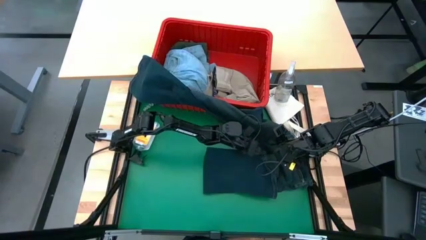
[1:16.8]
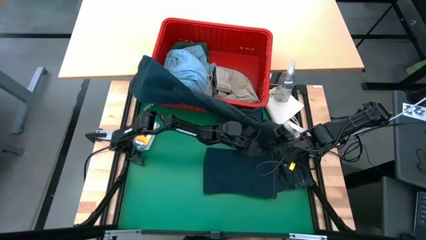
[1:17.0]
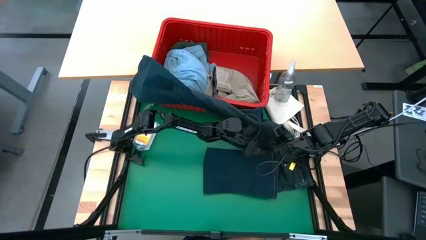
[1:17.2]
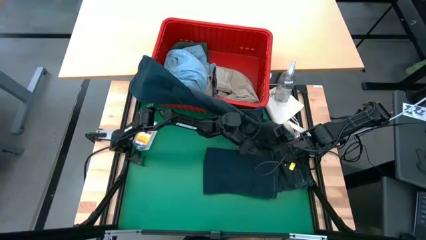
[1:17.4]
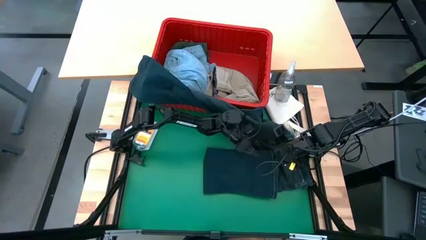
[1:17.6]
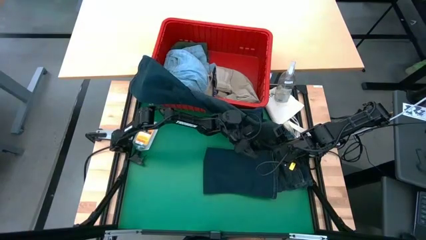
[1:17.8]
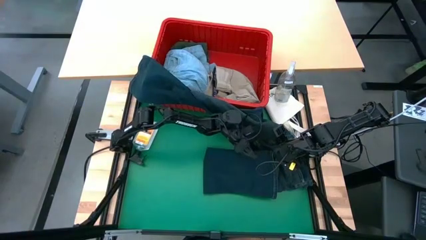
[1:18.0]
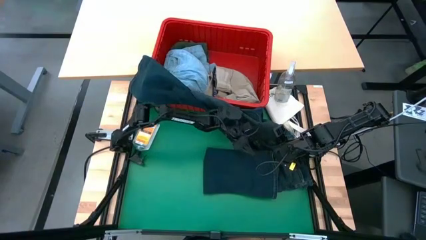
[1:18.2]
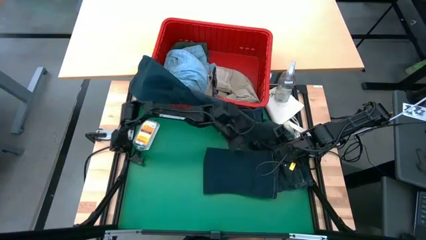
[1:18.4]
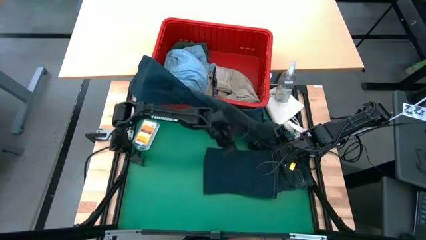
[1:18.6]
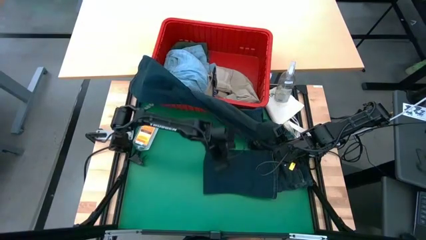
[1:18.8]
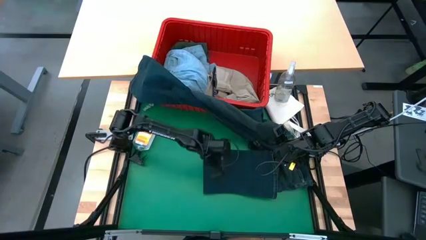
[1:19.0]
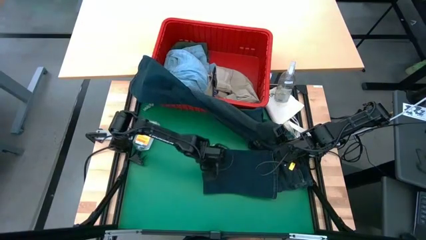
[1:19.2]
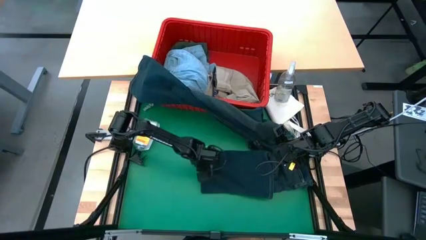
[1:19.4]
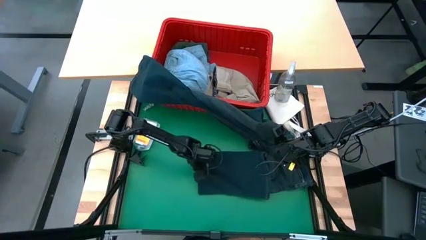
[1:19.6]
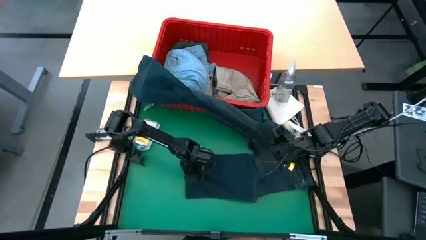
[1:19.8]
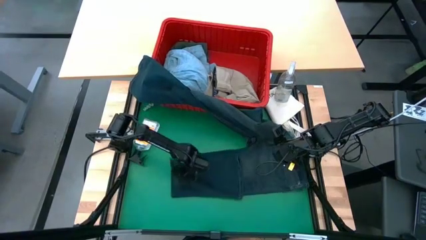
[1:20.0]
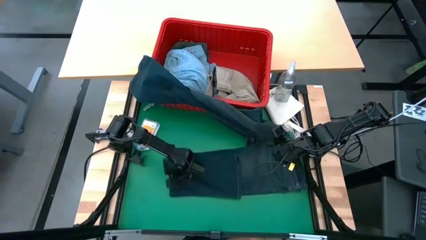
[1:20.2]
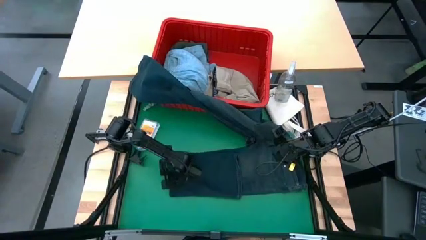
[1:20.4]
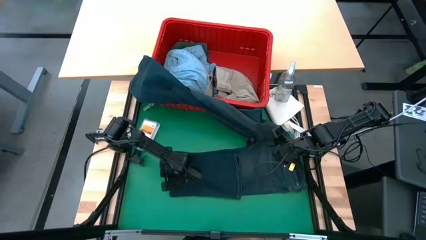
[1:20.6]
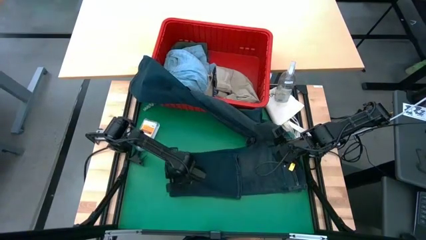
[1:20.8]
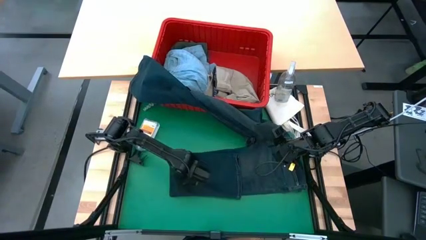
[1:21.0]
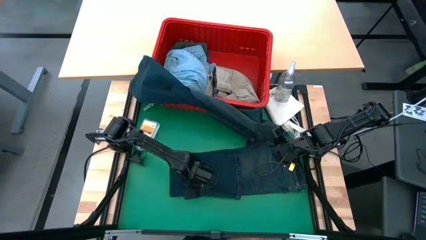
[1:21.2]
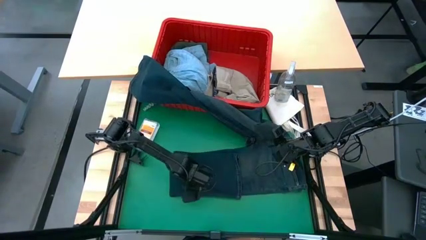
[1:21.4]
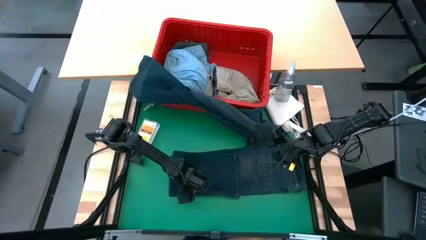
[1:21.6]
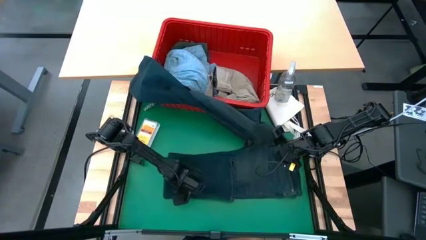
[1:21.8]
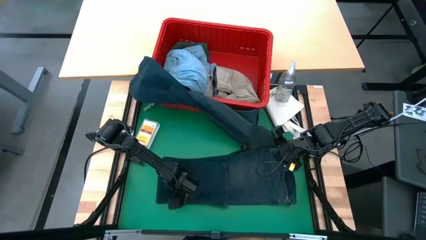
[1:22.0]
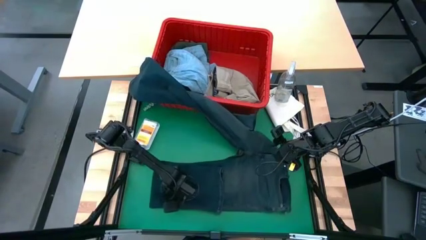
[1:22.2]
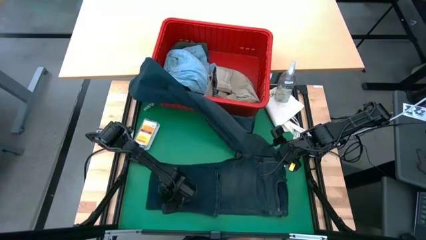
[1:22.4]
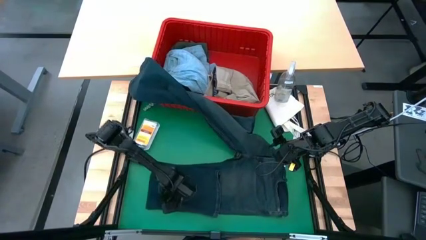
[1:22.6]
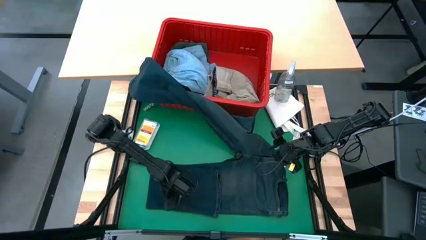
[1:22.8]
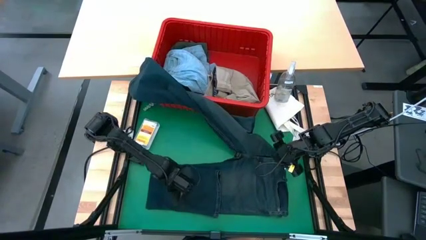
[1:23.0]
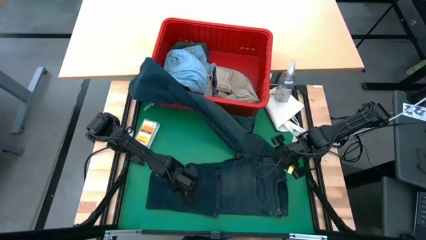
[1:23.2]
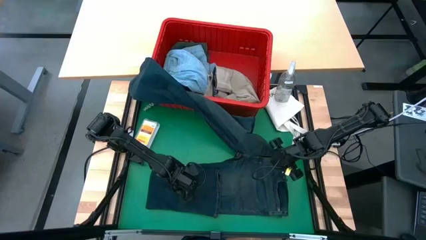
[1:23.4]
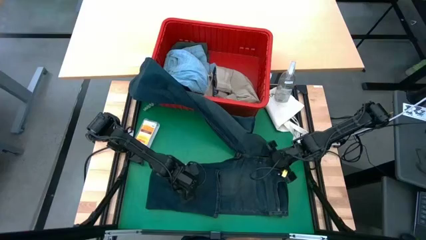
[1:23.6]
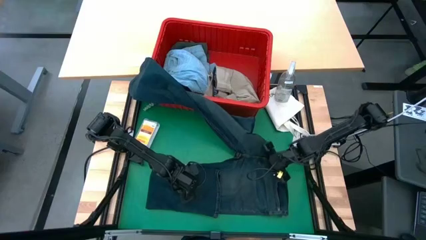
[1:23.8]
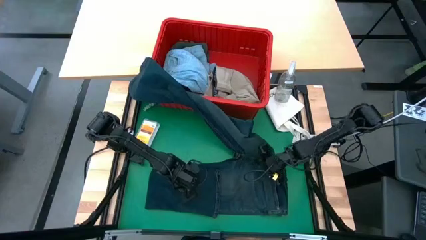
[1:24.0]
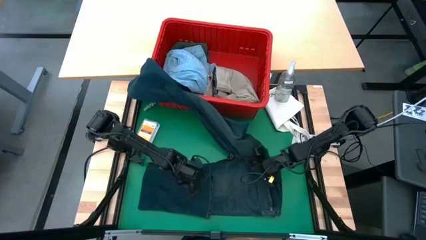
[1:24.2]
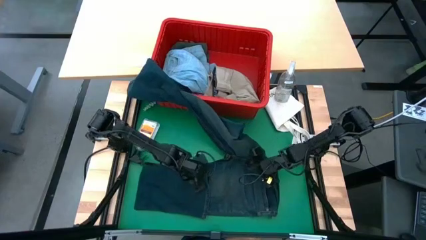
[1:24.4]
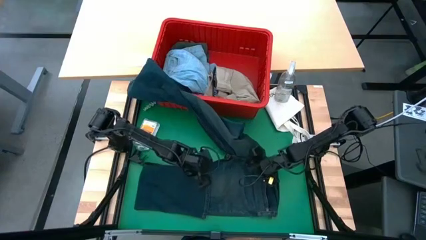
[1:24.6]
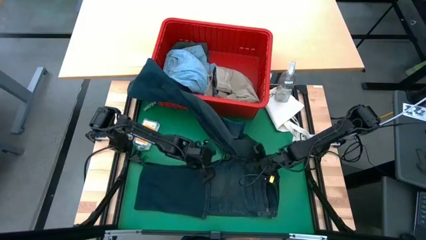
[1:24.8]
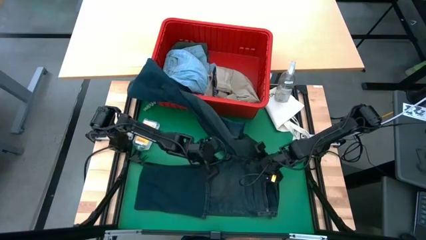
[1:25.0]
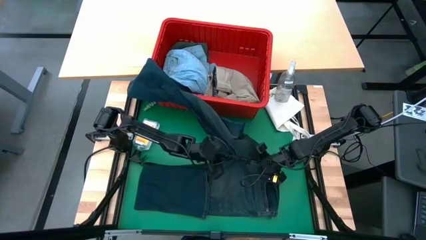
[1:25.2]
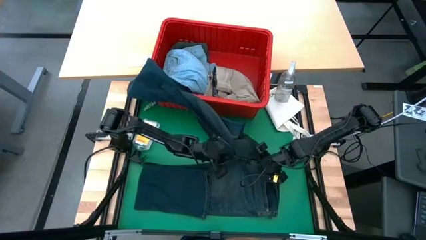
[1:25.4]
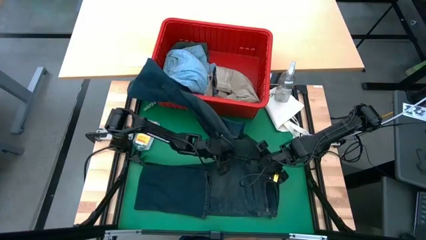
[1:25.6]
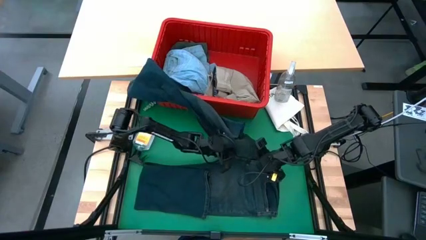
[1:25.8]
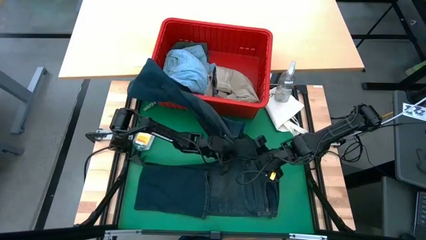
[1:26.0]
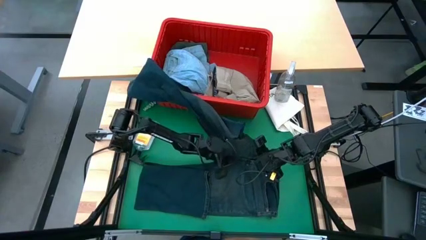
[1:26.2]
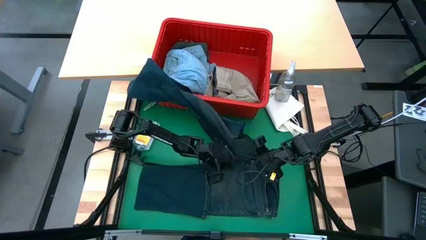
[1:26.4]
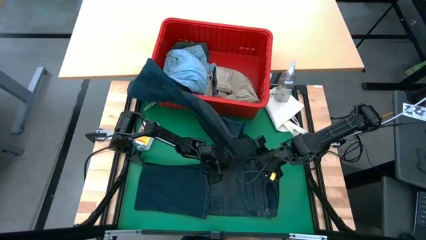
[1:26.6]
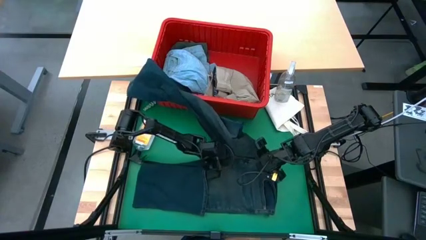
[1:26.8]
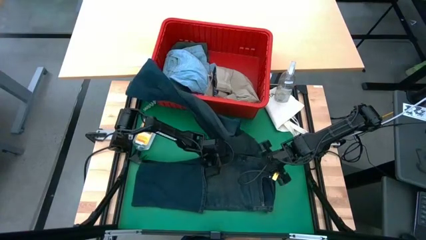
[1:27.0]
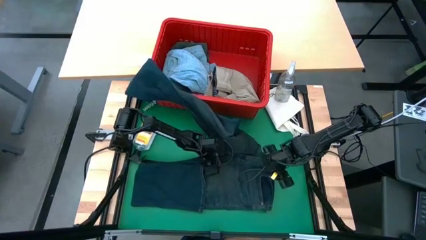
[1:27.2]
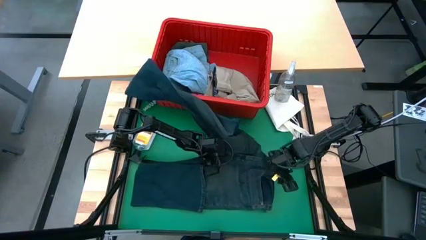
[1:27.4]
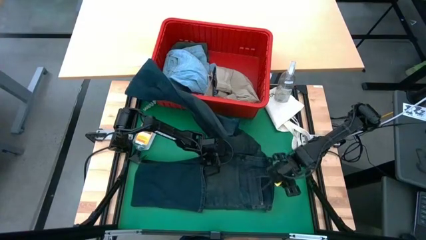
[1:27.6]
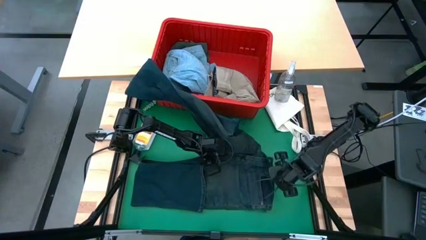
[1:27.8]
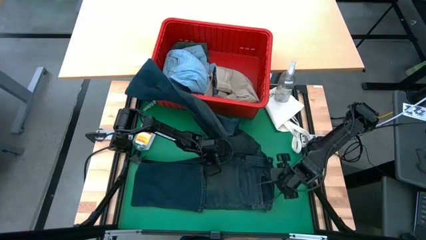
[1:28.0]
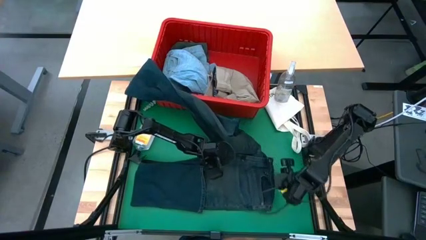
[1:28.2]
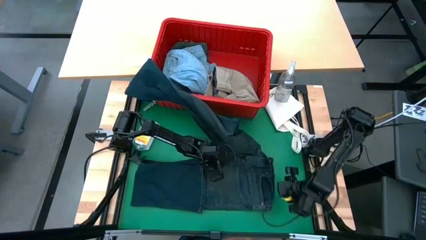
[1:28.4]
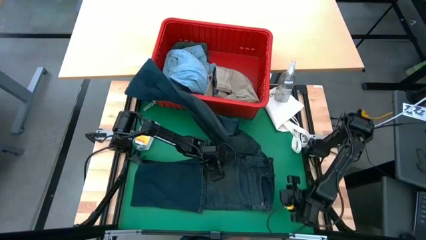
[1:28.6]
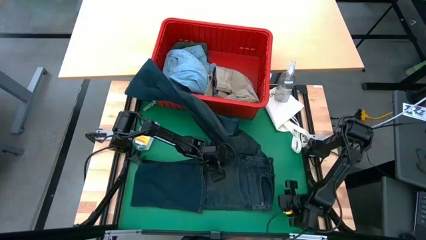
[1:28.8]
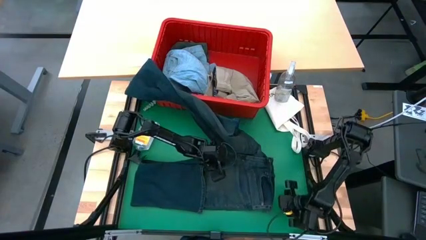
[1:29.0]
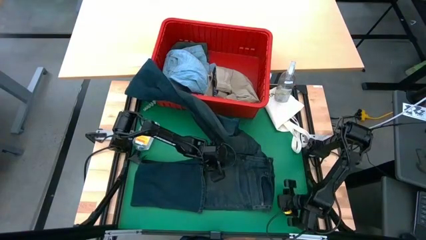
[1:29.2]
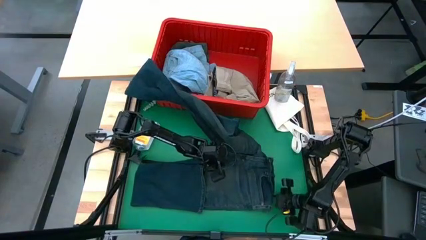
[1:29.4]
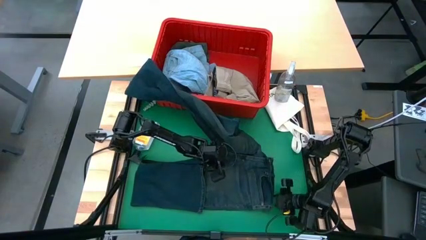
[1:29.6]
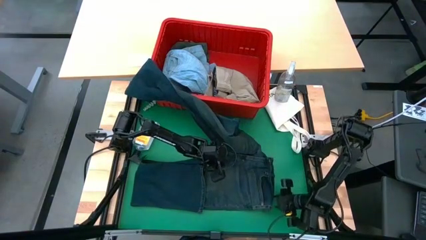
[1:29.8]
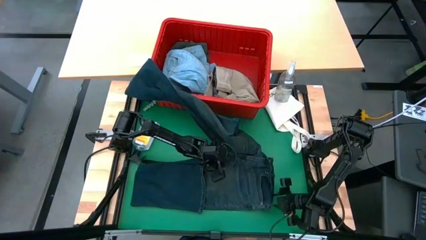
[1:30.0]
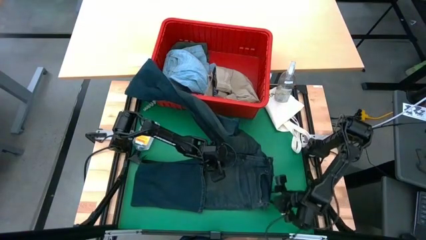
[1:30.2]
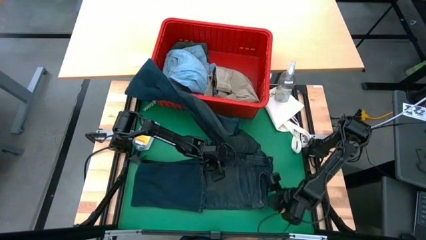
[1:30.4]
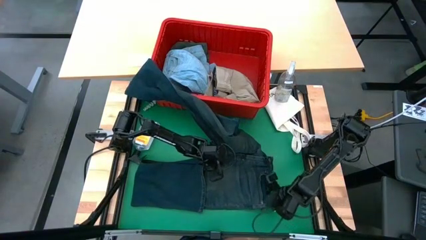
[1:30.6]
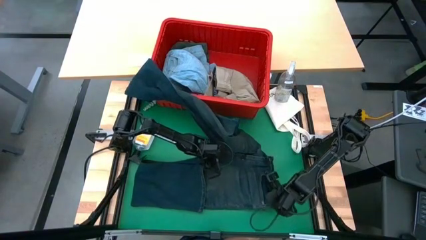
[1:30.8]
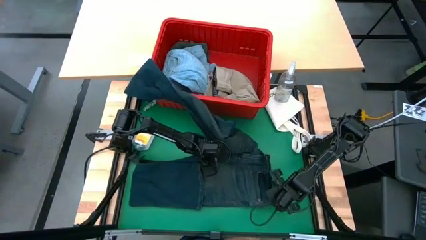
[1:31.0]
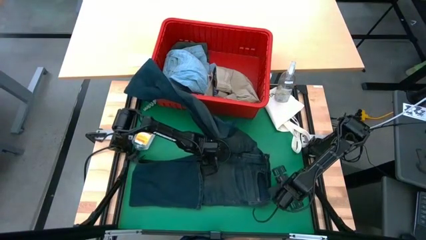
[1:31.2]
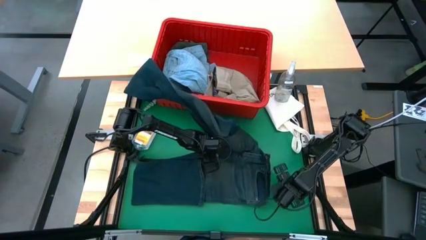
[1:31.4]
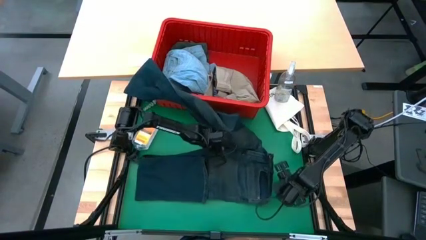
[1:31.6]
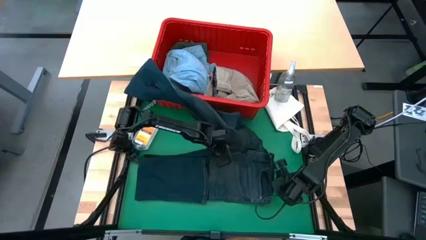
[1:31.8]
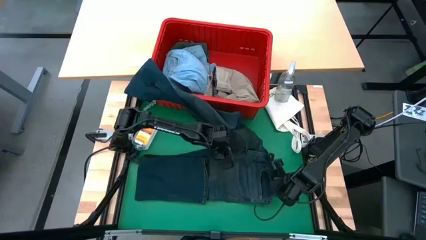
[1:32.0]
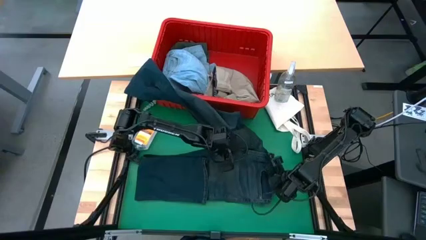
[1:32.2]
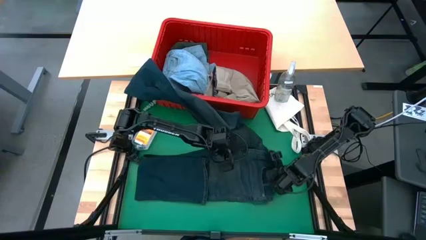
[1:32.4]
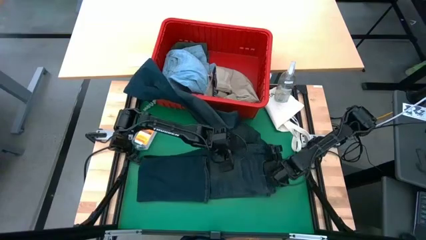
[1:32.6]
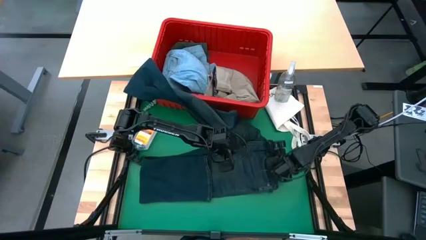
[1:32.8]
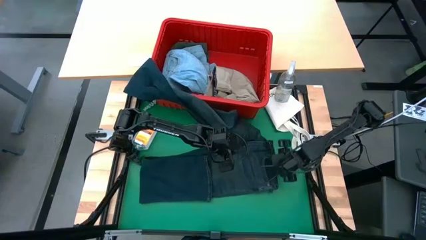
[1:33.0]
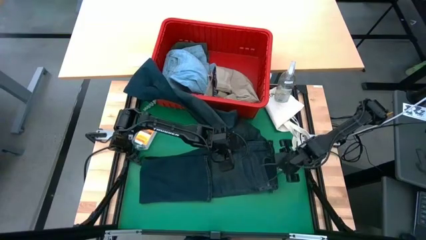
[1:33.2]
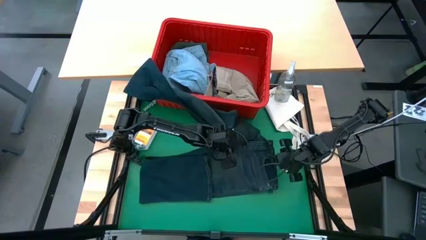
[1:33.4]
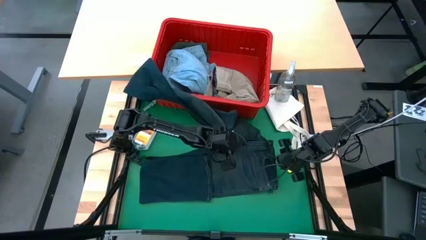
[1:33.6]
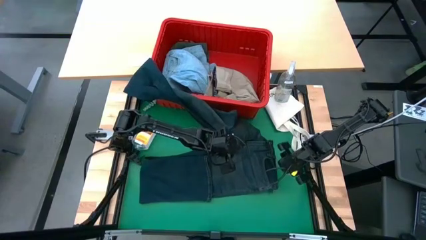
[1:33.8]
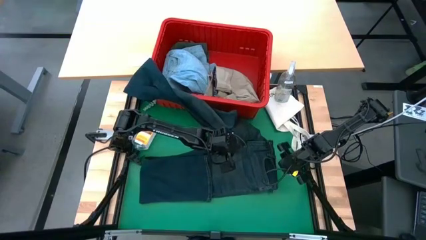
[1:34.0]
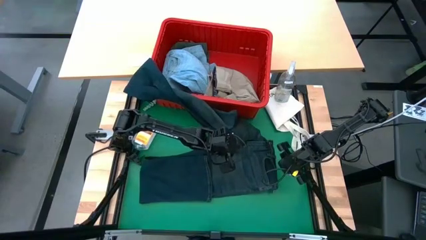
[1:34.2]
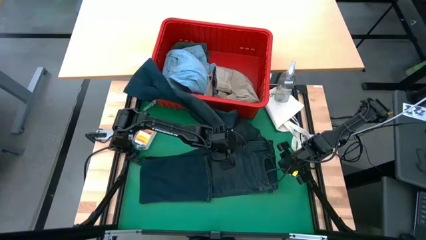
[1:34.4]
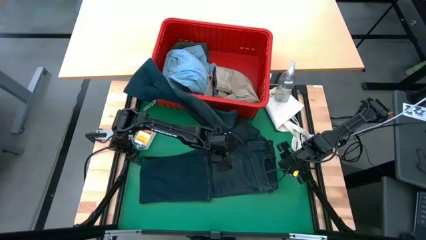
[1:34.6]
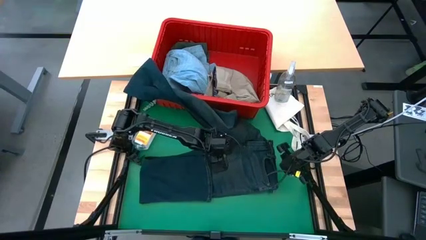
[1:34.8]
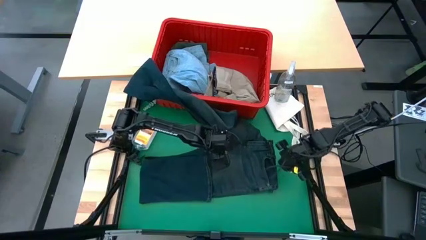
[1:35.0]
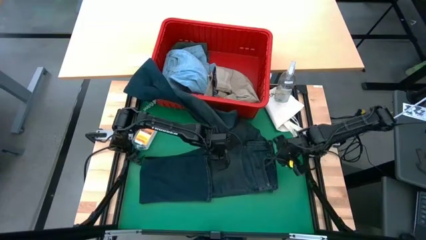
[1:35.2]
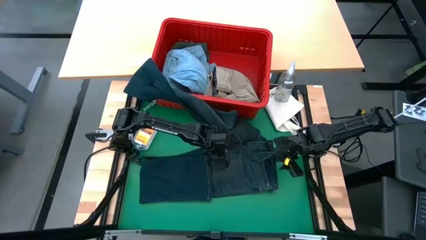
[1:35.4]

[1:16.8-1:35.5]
Task: Fold laundry
Fold the dark blue jeans
